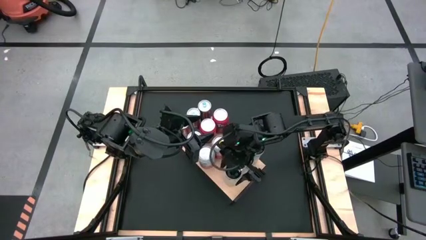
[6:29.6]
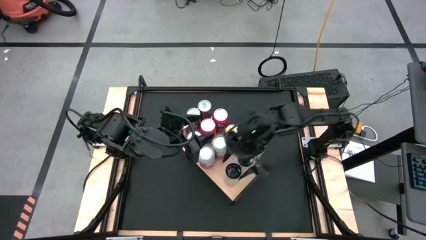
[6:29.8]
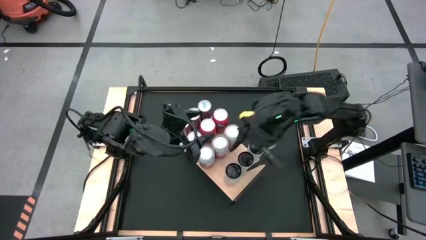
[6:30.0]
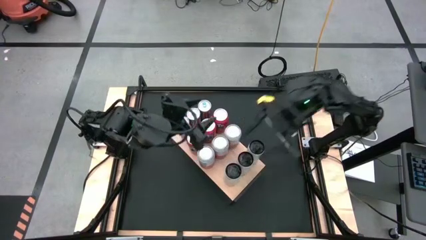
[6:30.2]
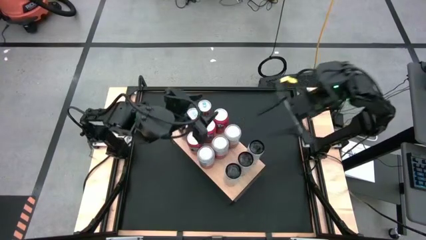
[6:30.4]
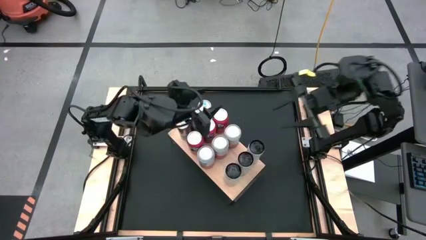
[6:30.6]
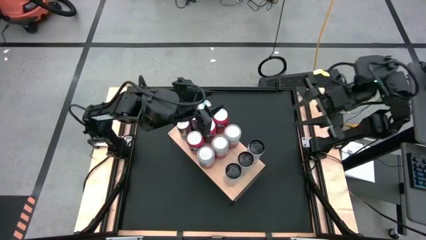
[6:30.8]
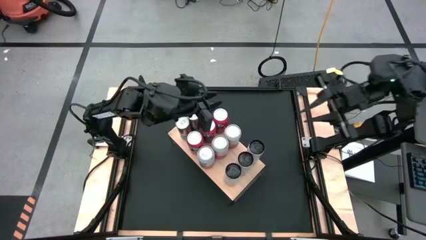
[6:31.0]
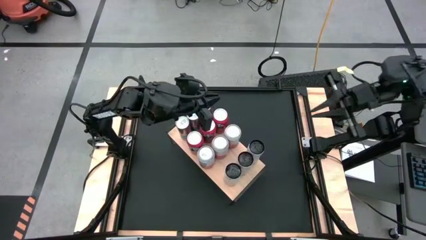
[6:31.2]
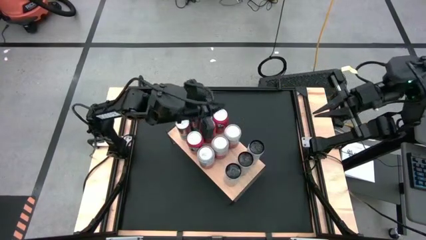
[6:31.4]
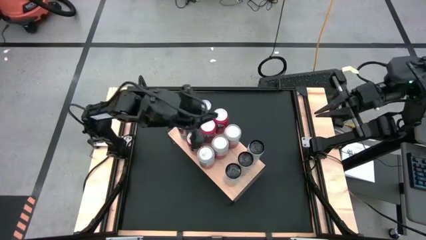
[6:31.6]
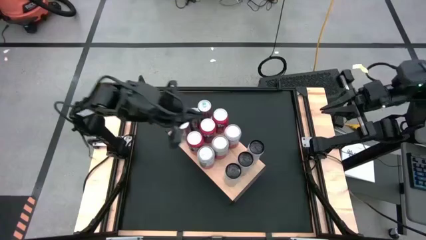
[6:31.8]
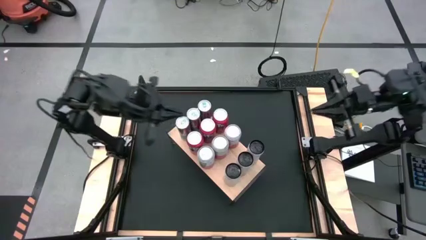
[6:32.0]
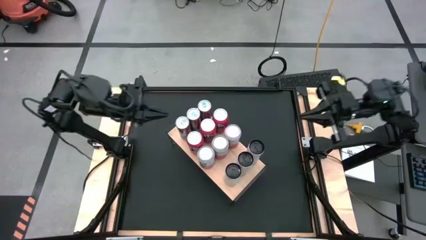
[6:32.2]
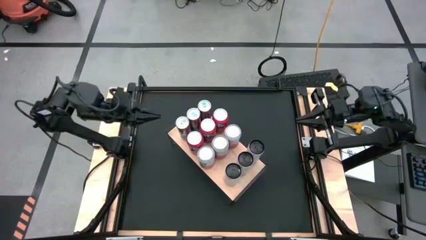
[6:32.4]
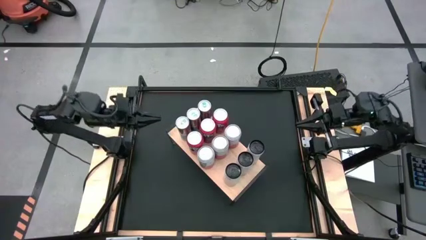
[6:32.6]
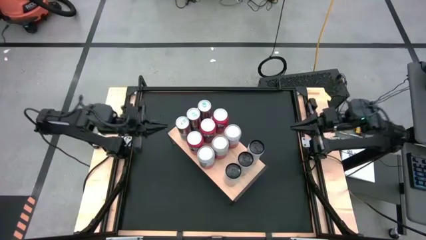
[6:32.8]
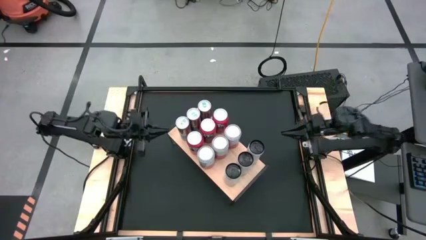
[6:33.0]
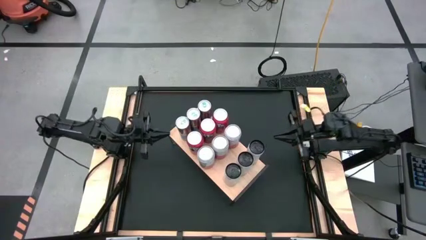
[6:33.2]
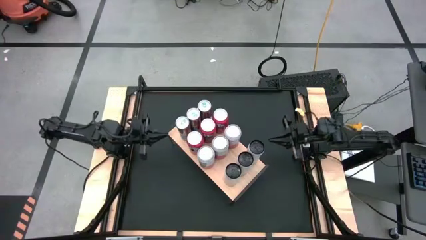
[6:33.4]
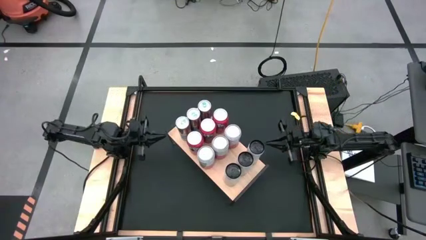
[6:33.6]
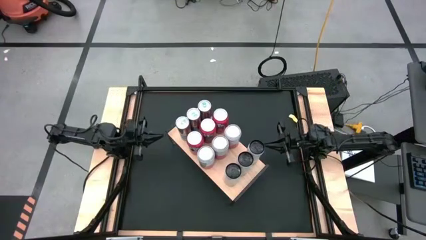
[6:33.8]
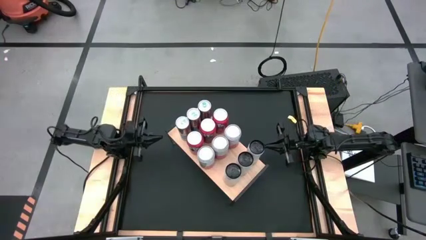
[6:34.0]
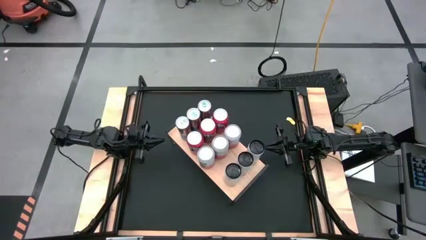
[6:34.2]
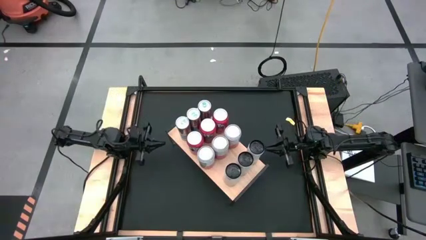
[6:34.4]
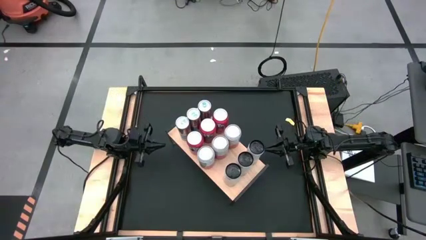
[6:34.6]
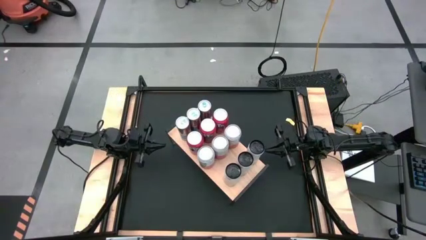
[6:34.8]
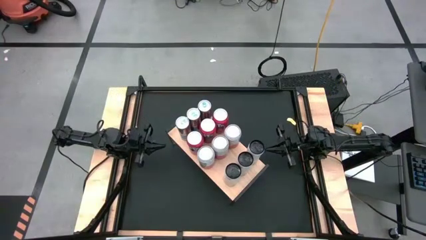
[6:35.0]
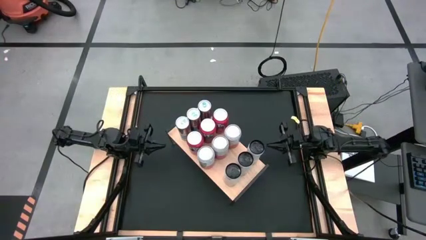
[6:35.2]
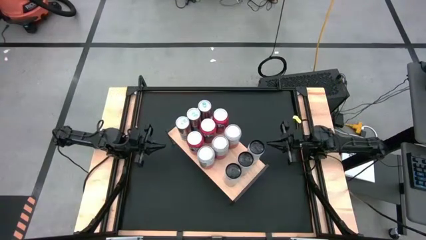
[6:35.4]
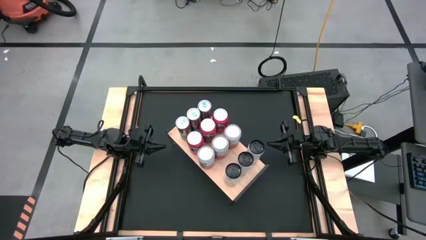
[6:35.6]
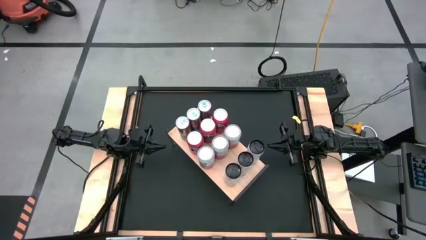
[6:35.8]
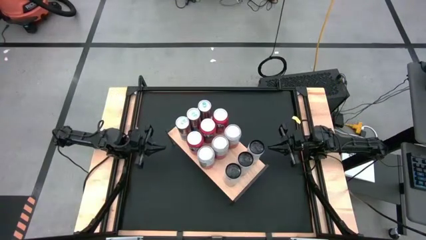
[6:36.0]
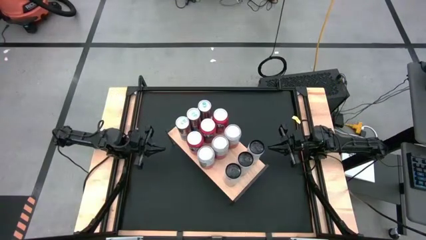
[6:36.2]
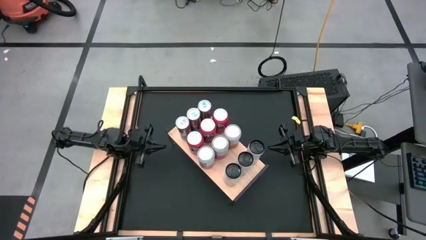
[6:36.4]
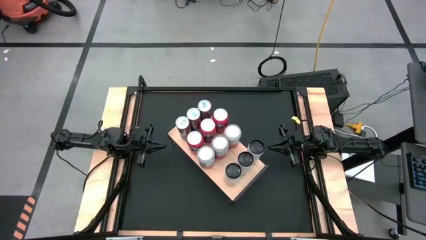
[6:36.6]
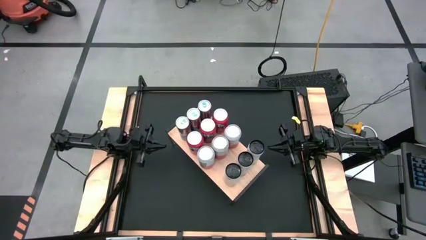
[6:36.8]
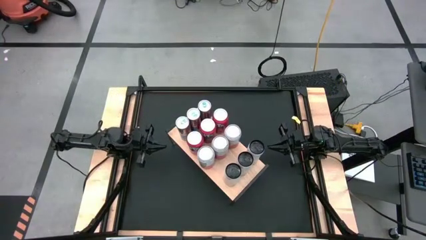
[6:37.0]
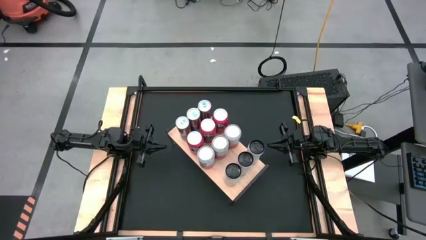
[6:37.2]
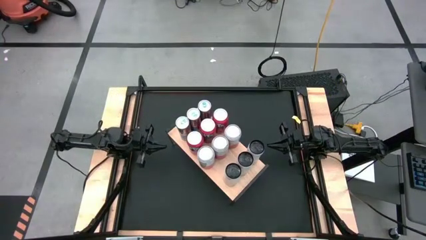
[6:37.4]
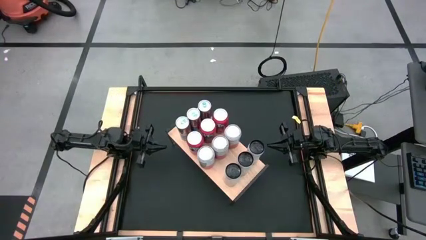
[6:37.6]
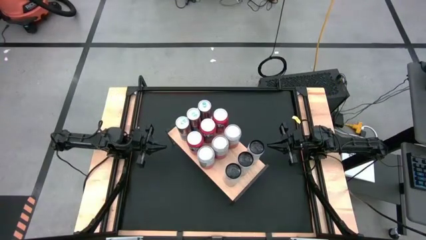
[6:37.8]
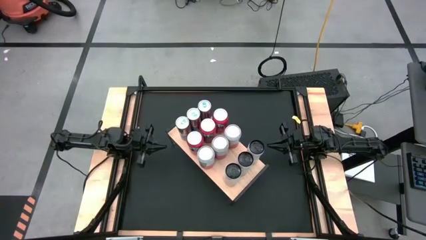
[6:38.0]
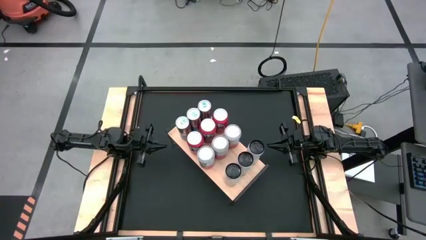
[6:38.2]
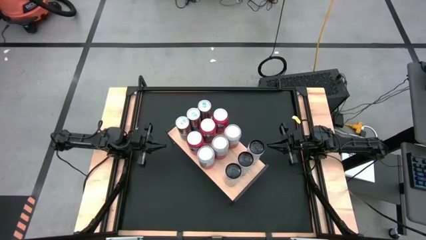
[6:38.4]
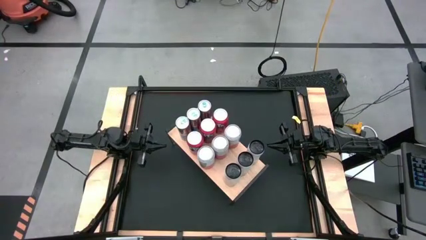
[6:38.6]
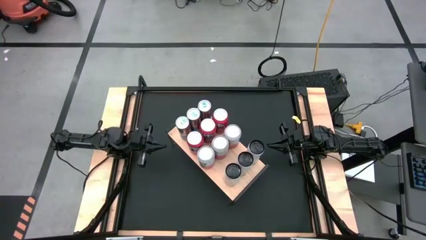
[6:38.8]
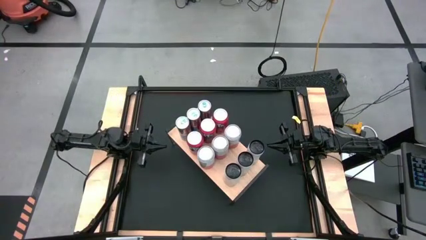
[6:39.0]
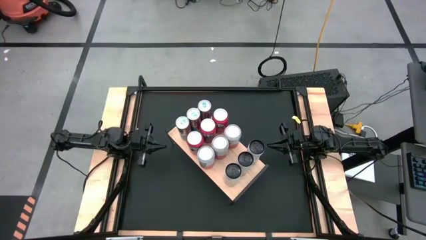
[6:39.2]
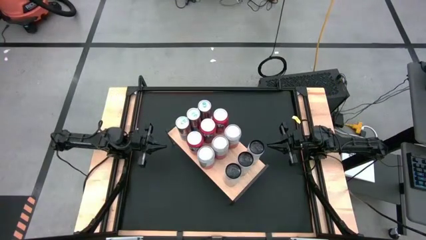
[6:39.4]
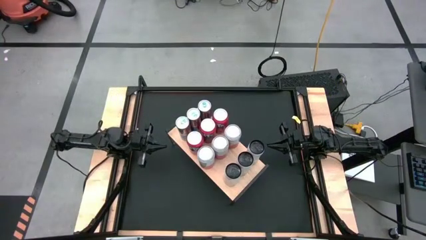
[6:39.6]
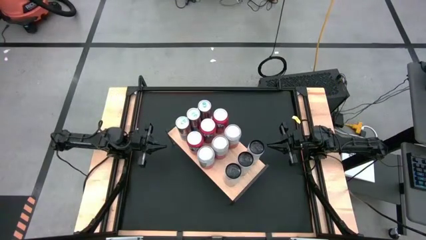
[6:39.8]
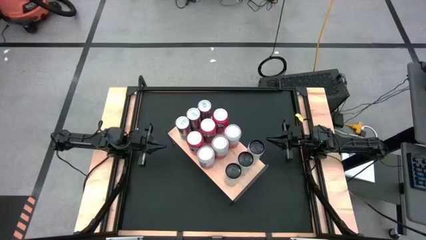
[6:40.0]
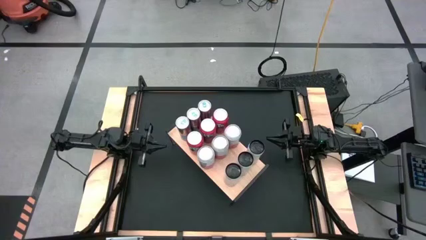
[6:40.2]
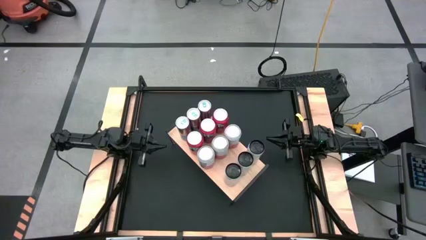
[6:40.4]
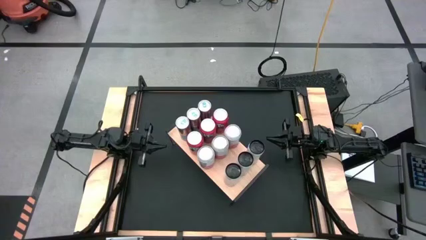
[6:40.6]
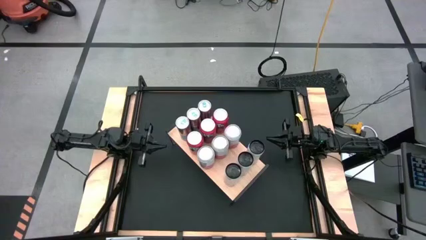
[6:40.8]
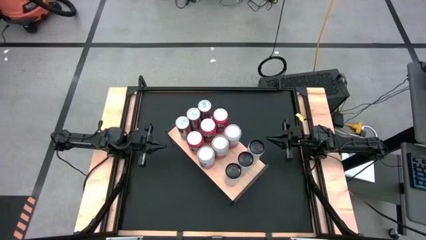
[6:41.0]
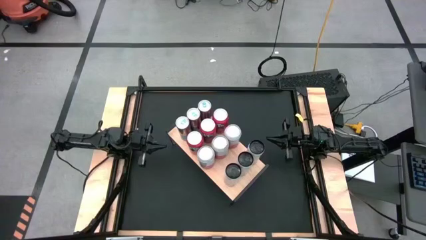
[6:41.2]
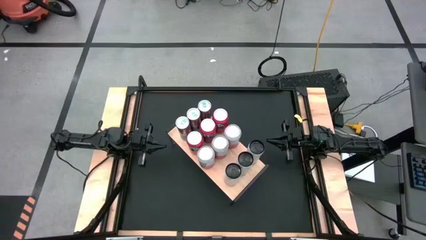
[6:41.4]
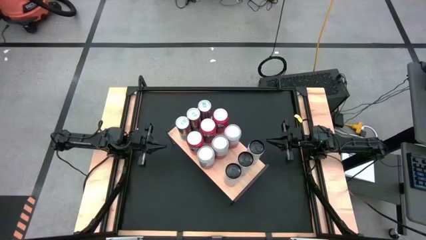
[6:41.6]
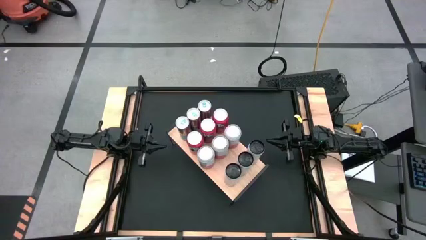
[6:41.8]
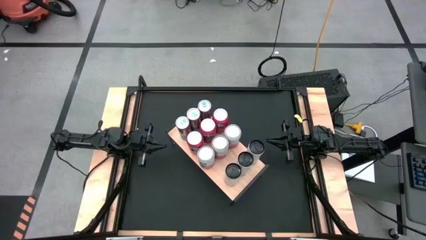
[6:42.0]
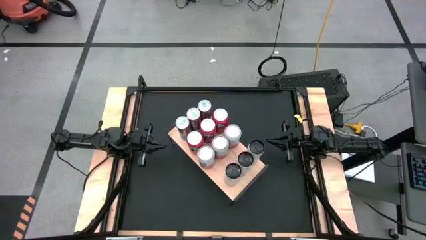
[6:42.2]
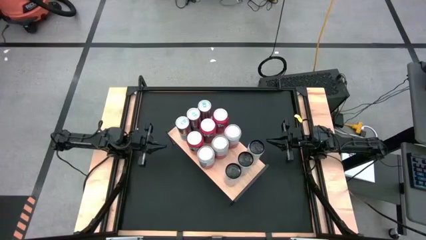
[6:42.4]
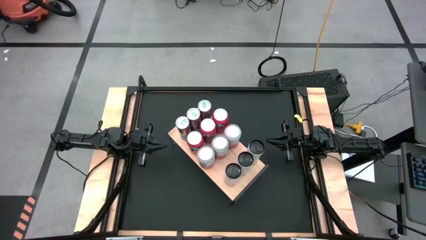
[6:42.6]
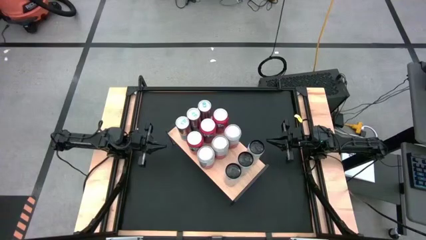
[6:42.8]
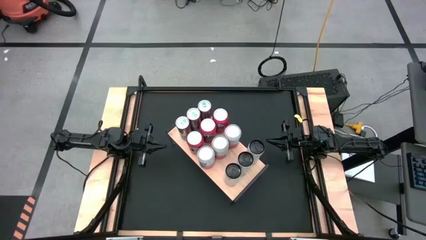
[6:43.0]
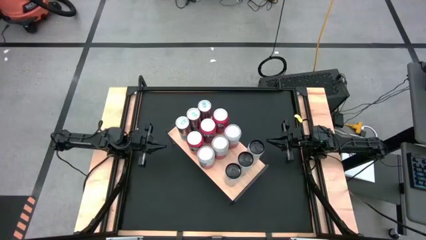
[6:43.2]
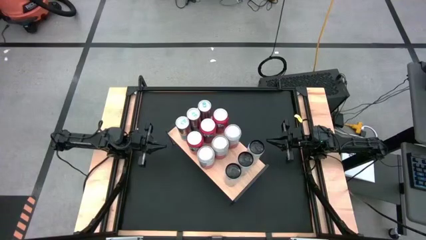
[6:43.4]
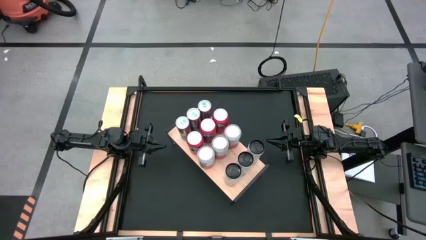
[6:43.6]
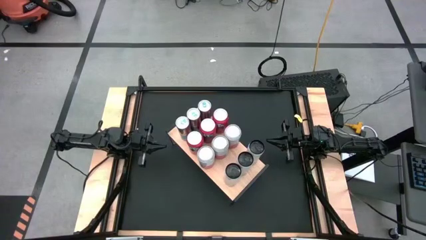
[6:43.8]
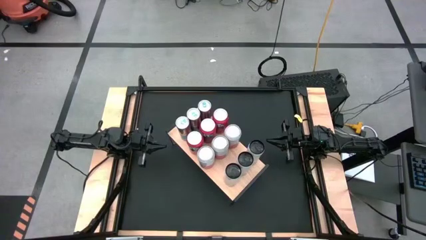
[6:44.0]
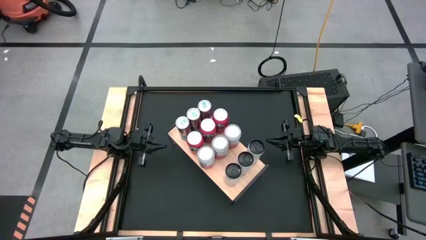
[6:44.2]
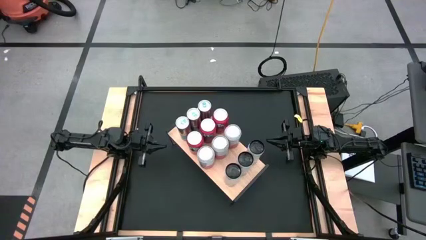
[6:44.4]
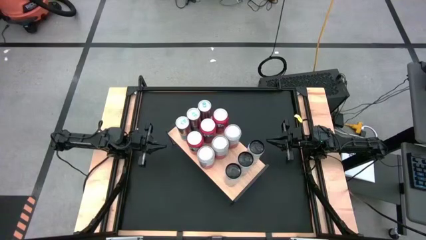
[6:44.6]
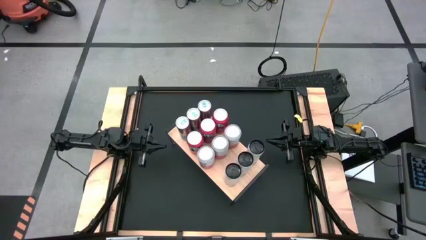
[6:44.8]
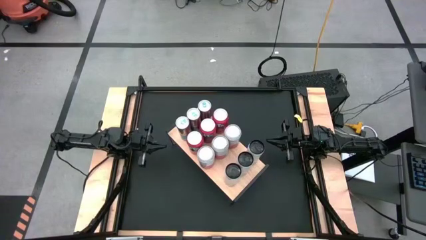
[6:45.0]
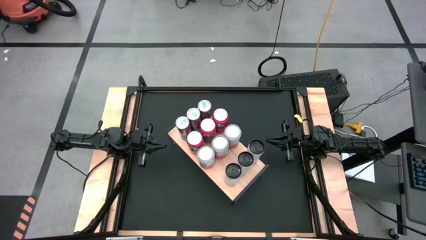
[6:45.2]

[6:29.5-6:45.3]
Task: Place canned beverage on shelf
Return to Home Position
